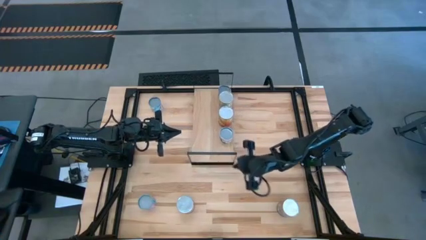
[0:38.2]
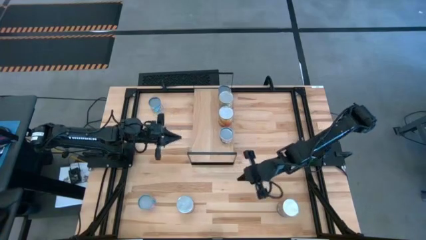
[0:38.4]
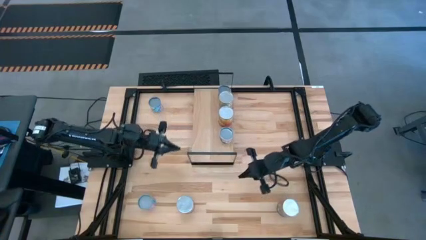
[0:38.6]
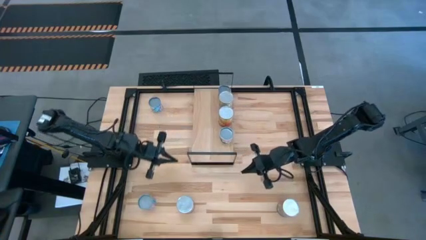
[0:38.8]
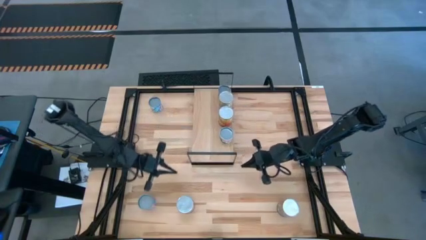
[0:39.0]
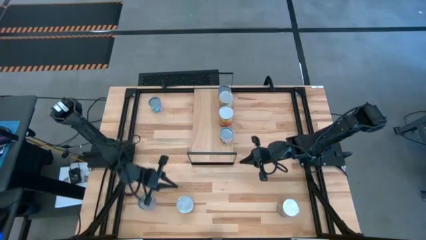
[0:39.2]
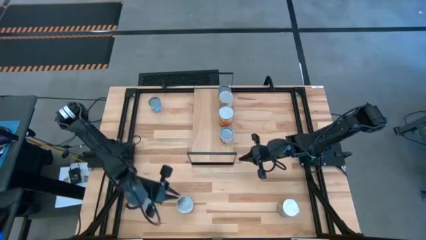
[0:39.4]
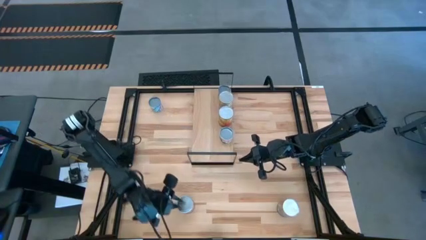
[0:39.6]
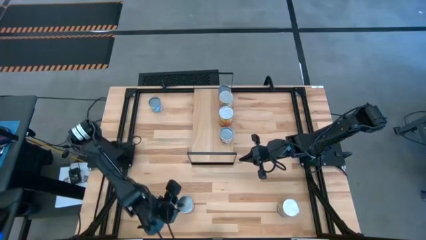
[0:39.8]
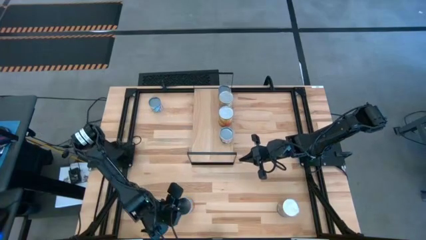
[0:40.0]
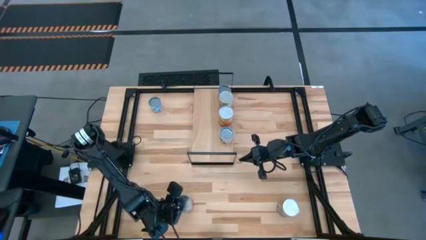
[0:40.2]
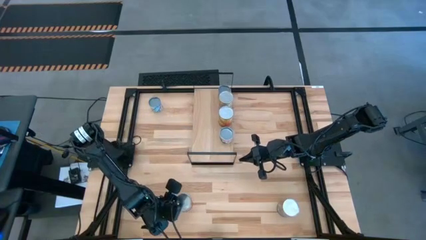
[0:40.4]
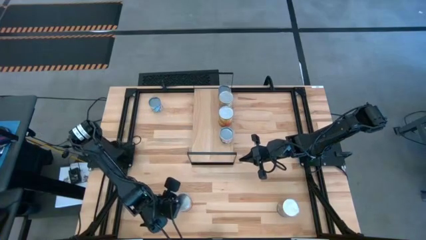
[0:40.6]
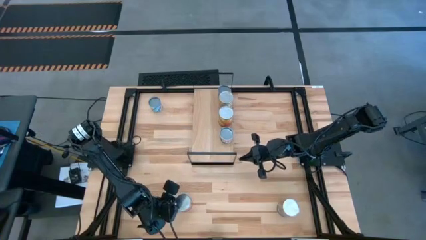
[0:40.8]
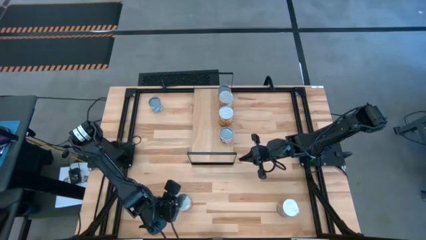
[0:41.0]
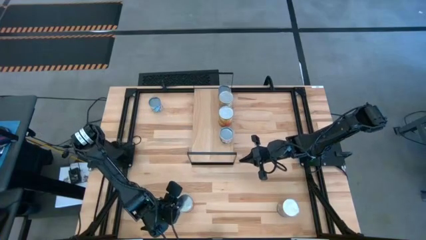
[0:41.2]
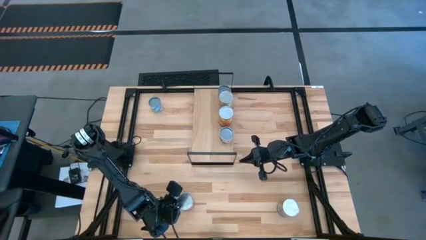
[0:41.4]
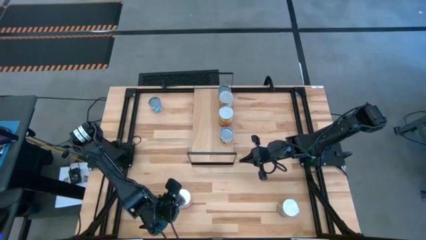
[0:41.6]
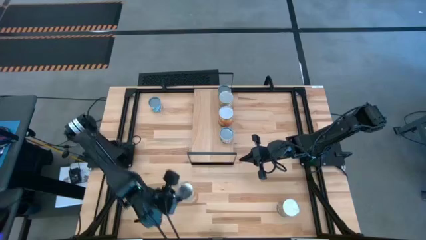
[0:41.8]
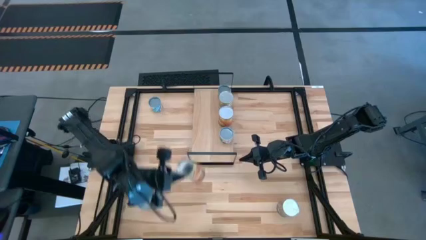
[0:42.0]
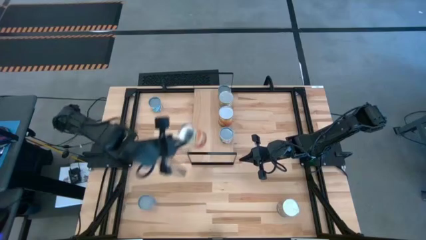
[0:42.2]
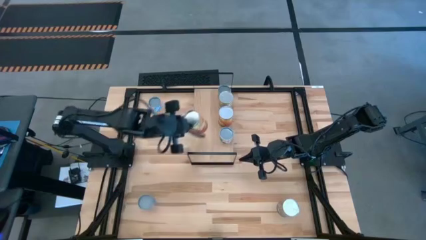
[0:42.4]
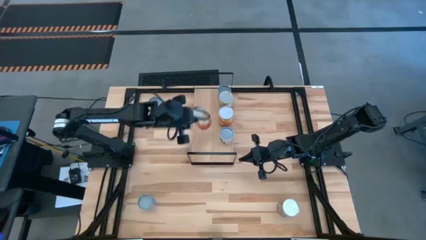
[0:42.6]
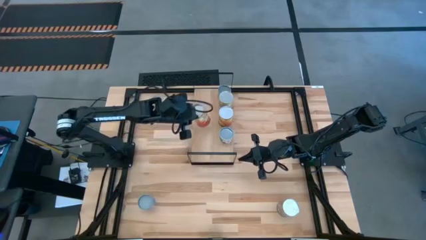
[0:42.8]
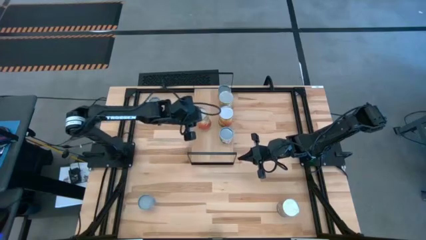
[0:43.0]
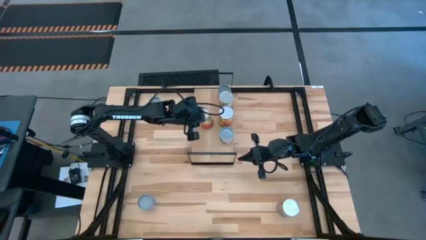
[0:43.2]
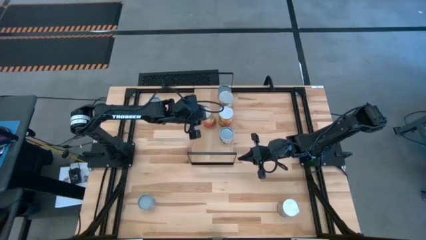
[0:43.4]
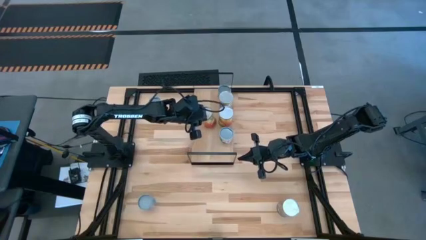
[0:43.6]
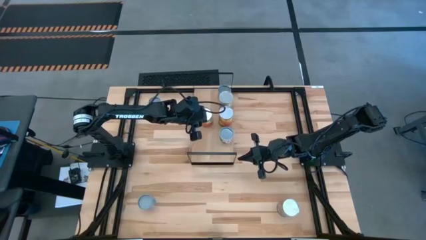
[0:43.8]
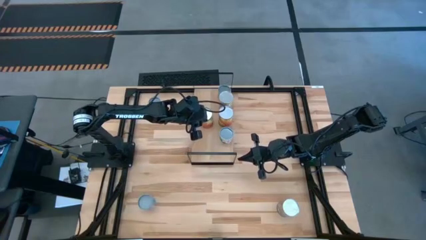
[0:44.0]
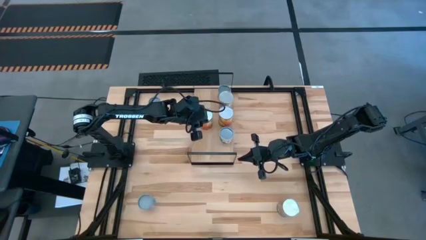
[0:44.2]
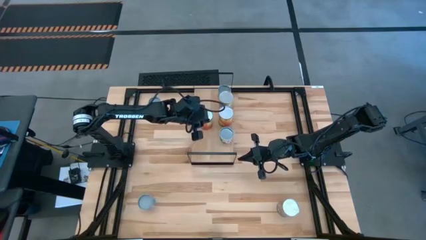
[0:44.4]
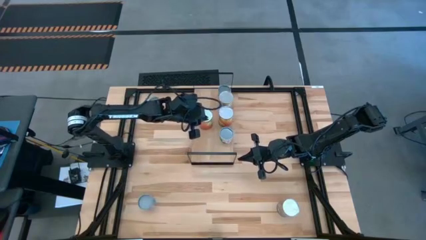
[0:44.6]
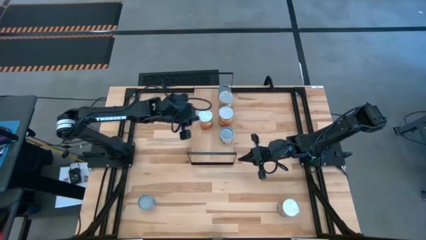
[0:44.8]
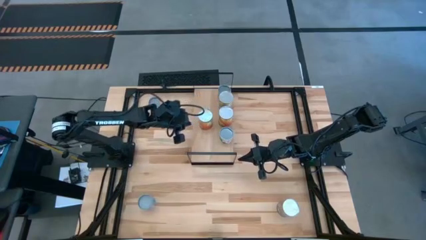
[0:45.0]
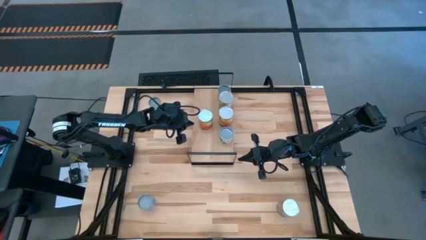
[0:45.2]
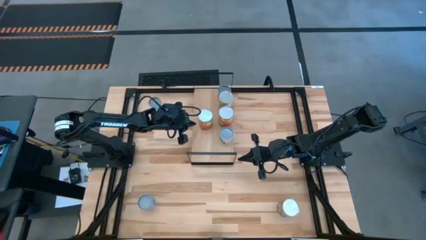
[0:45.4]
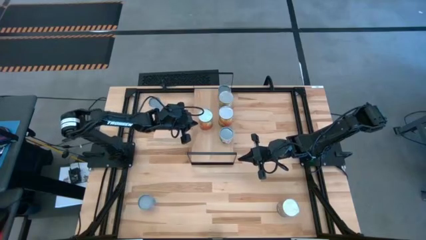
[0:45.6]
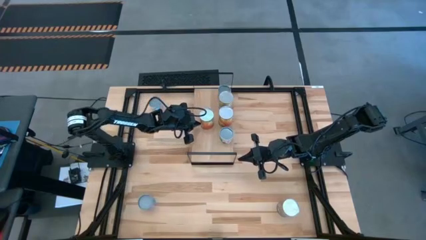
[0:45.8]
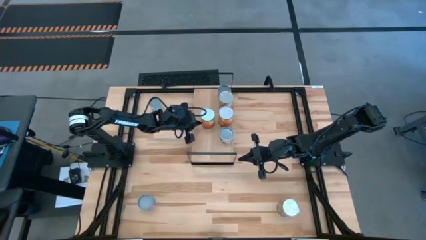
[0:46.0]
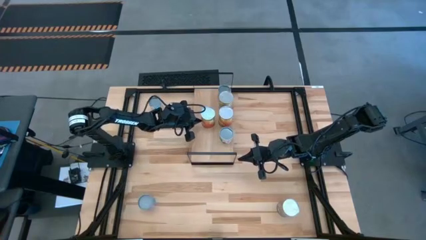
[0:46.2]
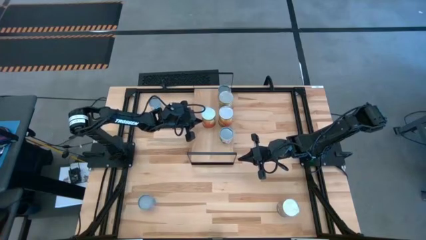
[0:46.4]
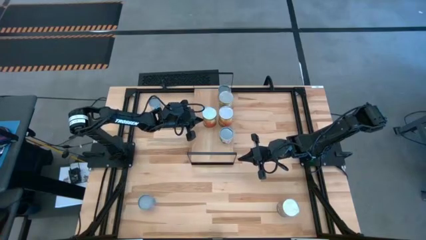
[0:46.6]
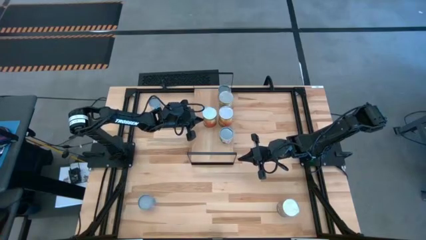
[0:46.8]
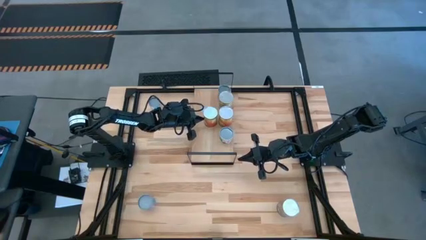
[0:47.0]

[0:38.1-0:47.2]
Task: Pick and place cans onto a shelf
Put the large orange can on the shelf aligned with the other orange can

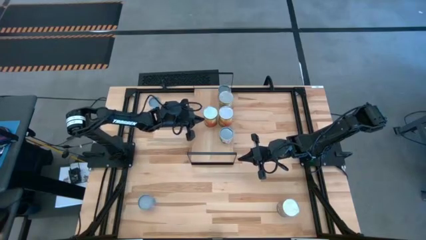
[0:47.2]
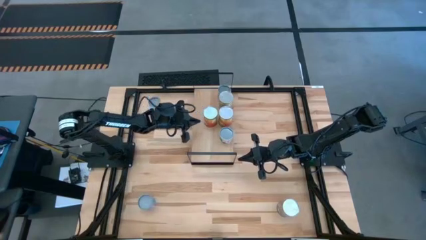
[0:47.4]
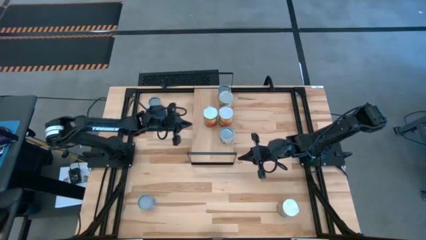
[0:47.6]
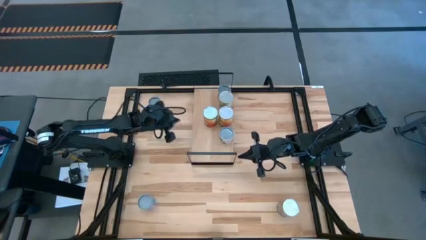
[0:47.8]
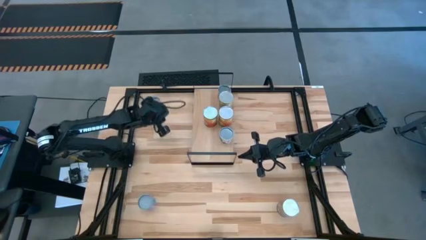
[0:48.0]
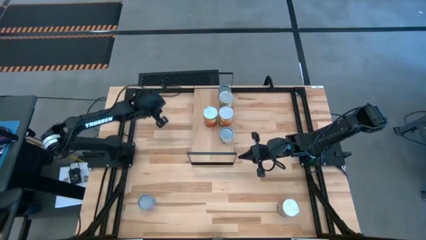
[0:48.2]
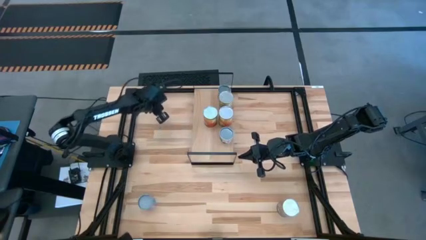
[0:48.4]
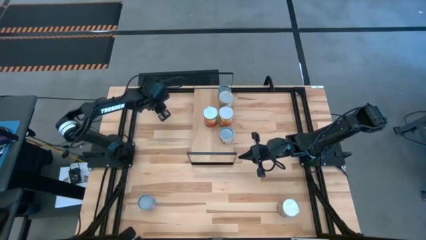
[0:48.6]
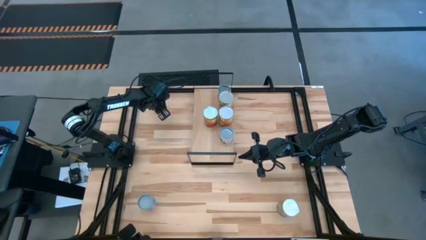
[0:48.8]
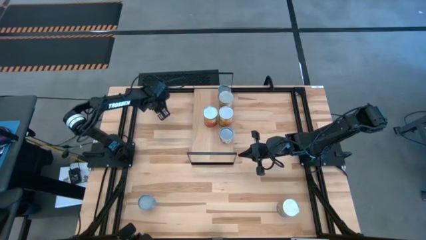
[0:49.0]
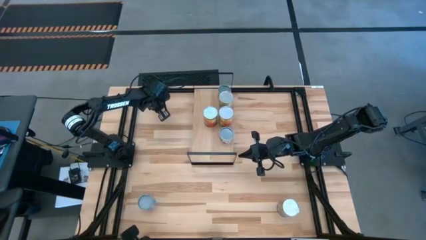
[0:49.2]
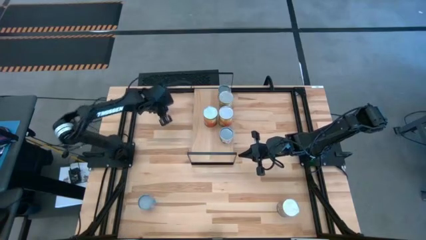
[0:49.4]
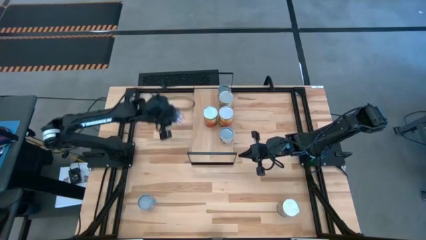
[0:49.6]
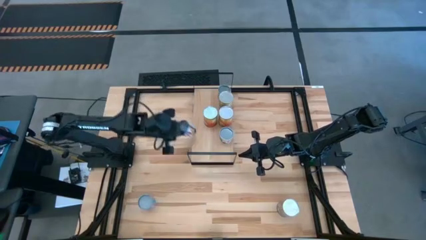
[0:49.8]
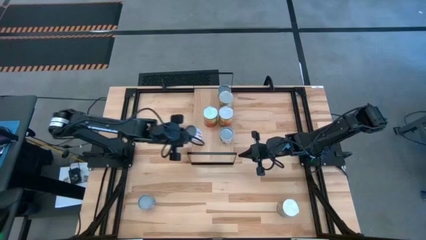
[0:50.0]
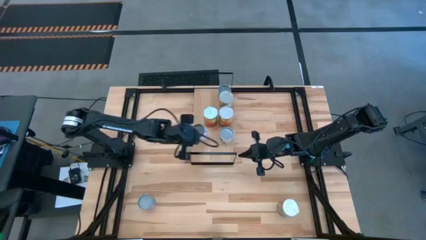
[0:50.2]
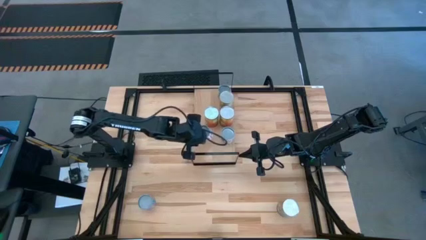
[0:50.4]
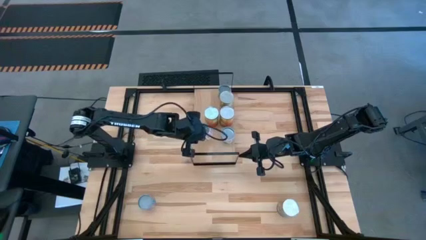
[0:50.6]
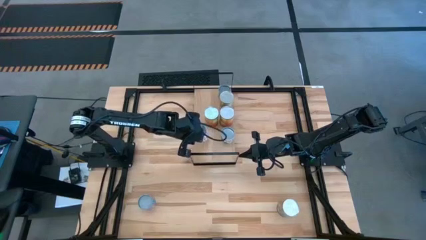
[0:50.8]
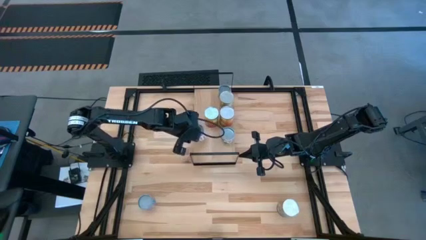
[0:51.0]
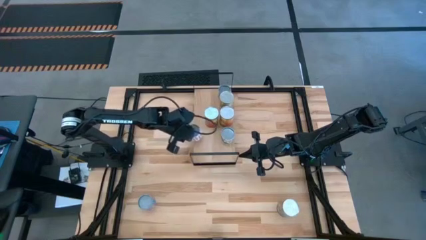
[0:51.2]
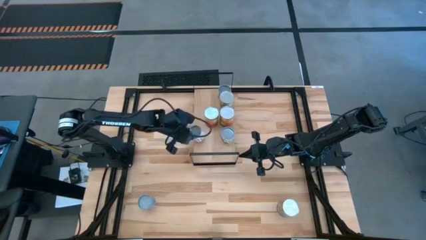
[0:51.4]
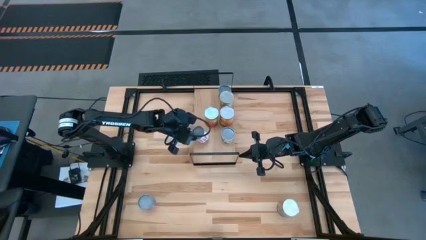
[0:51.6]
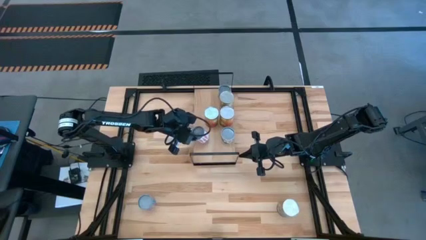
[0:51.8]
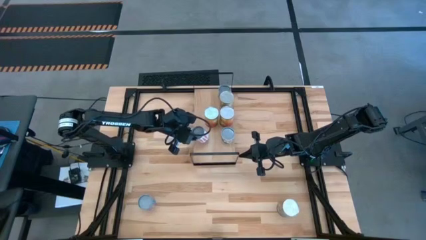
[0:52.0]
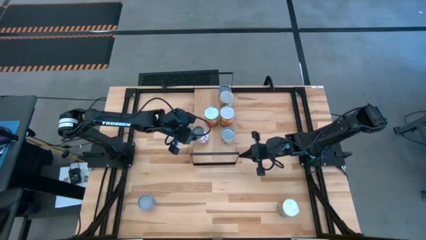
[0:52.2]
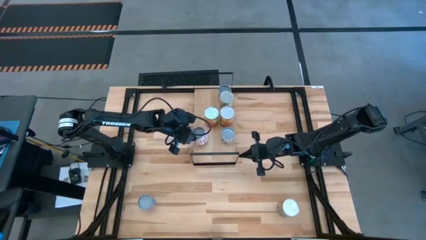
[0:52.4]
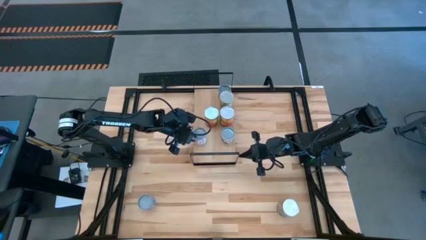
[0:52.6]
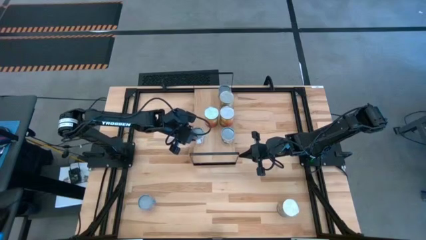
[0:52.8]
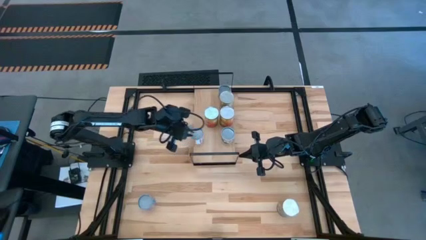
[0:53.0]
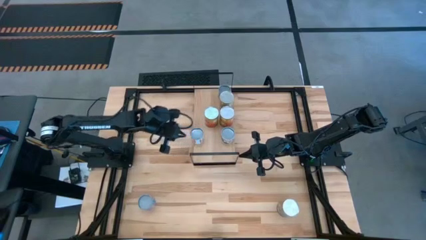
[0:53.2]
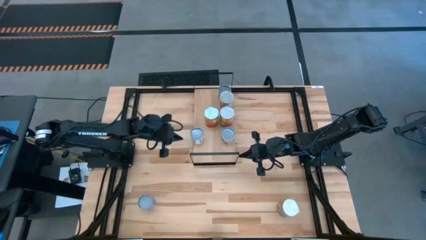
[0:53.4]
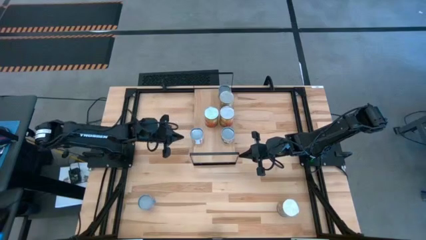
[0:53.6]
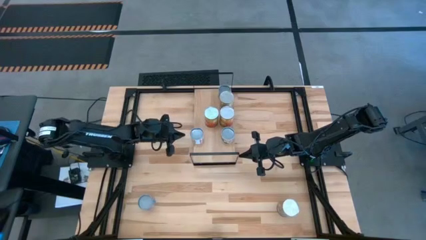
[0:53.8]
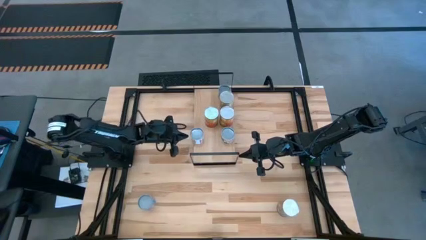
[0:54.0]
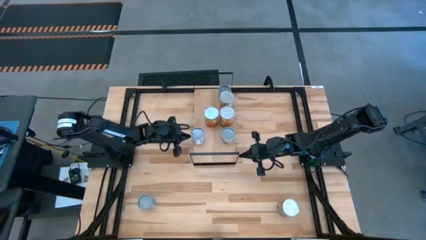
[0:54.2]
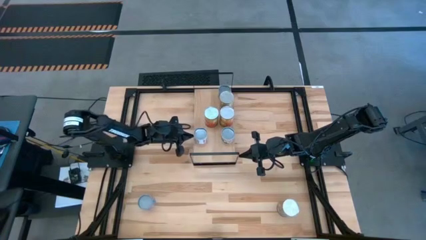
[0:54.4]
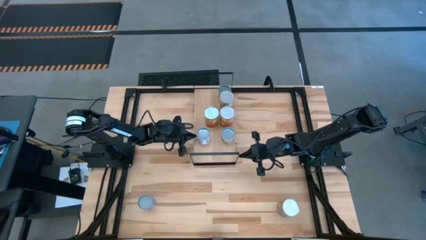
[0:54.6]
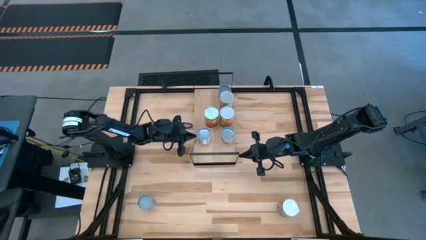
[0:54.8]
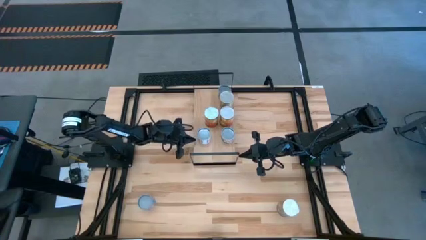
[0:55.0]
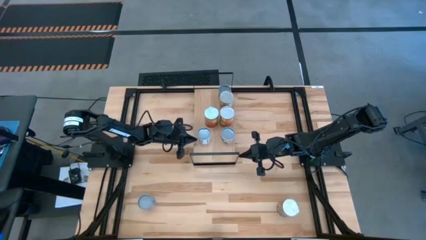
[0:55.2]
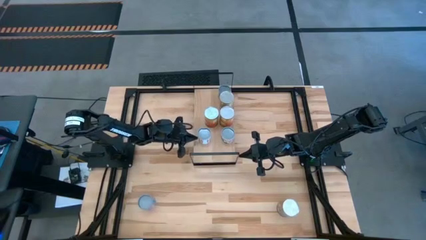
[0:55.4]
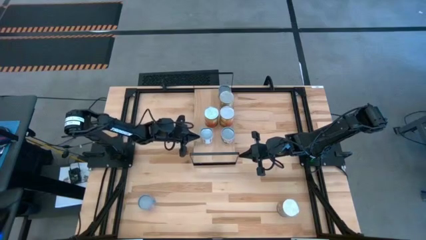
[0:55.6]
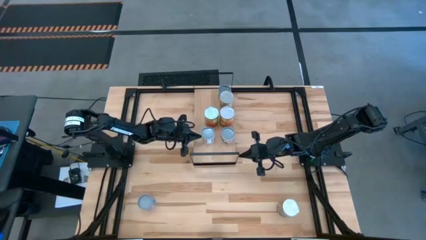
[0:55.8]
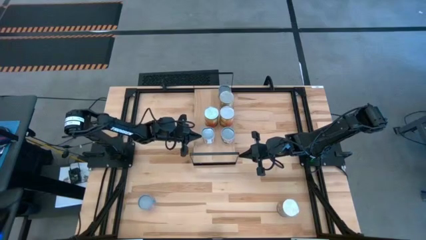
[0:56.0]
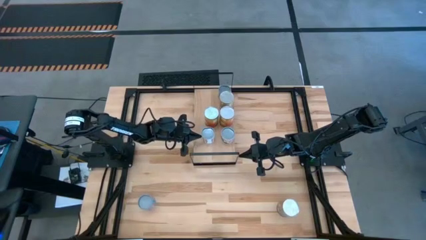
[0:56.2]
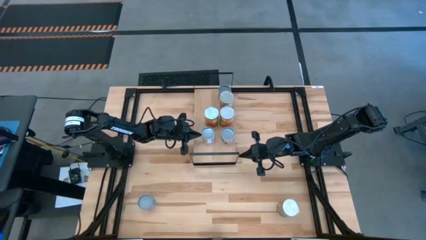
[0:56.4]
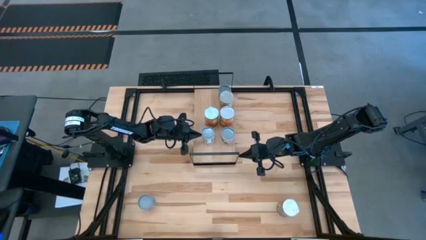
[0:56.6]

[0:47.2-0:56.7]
Put the small white can on the shelf aligned with the other green can
